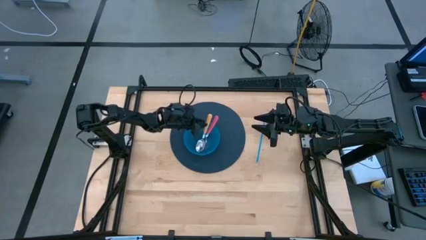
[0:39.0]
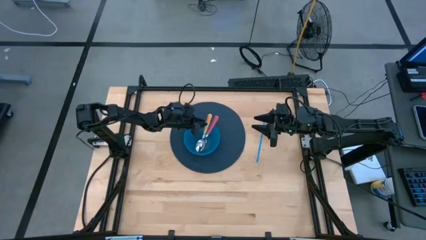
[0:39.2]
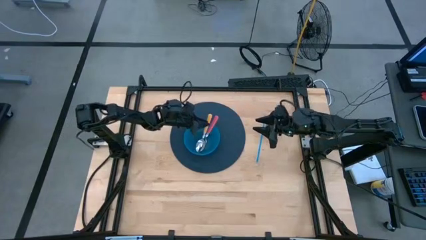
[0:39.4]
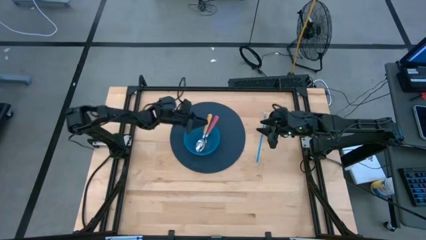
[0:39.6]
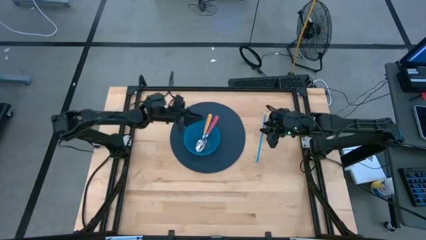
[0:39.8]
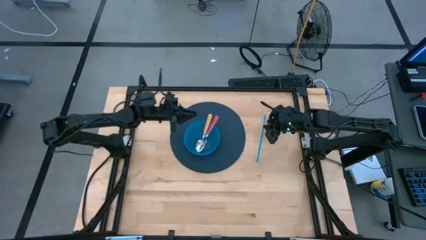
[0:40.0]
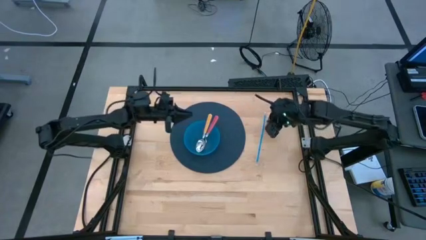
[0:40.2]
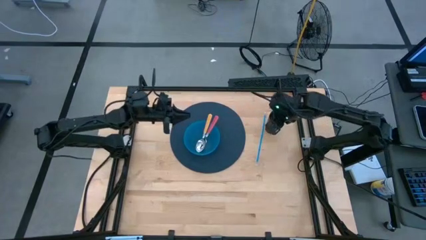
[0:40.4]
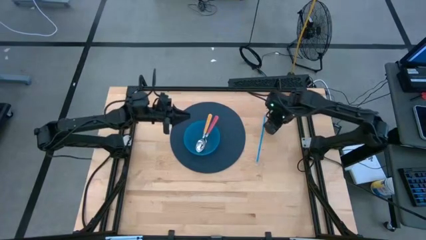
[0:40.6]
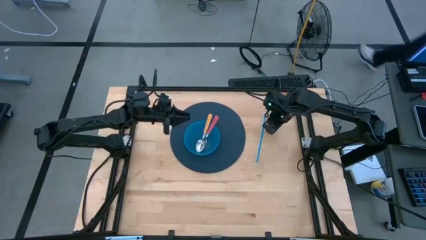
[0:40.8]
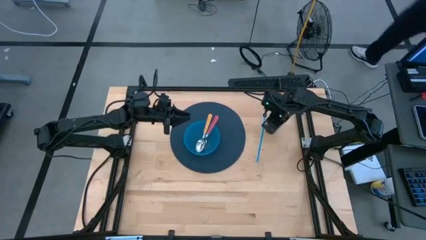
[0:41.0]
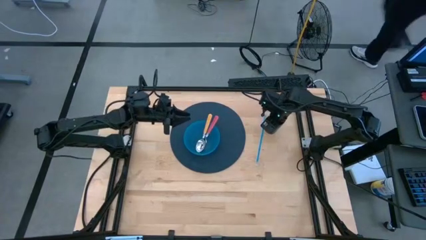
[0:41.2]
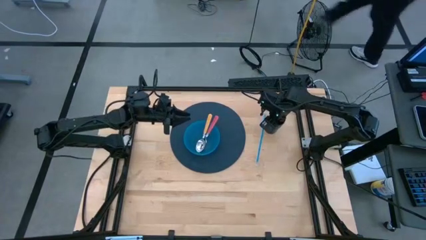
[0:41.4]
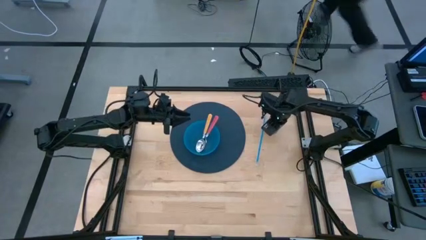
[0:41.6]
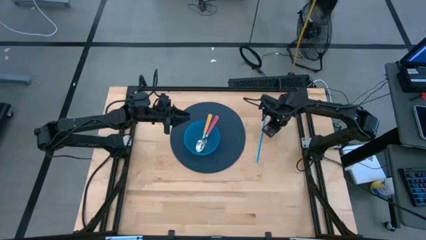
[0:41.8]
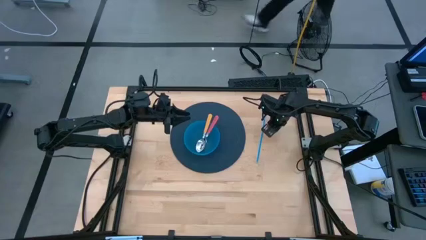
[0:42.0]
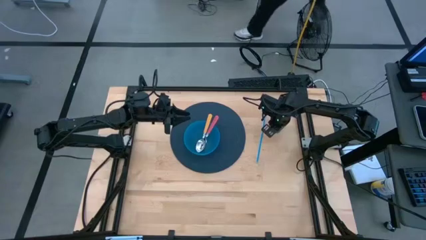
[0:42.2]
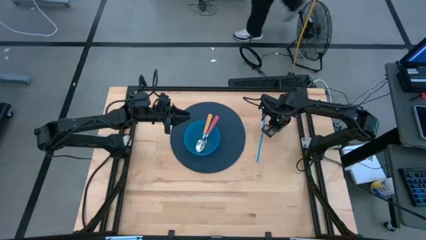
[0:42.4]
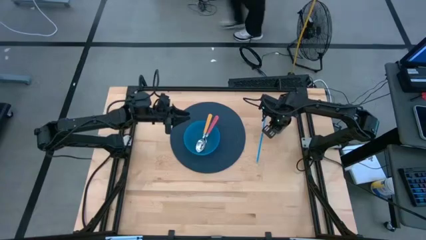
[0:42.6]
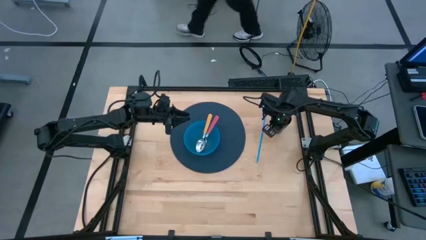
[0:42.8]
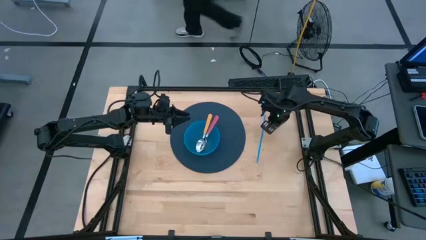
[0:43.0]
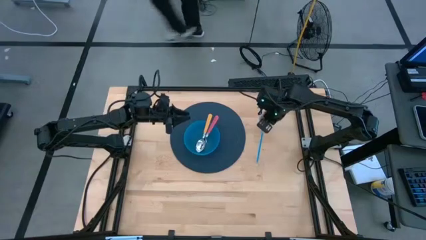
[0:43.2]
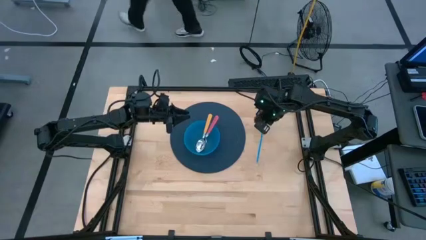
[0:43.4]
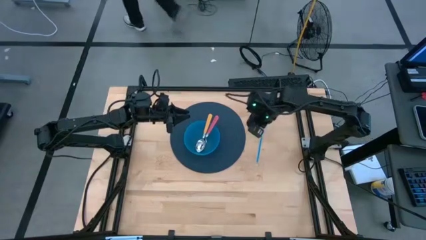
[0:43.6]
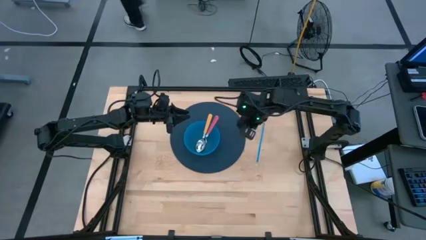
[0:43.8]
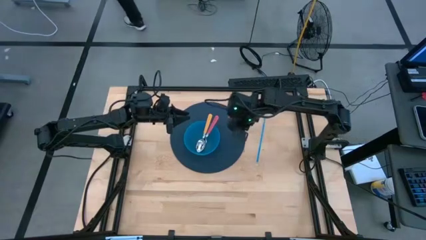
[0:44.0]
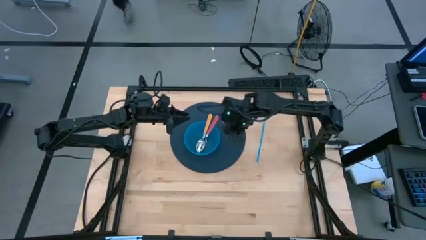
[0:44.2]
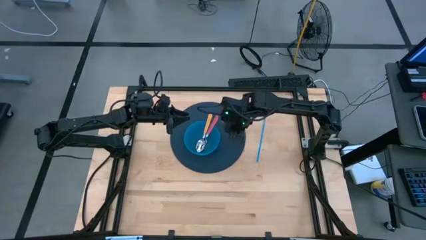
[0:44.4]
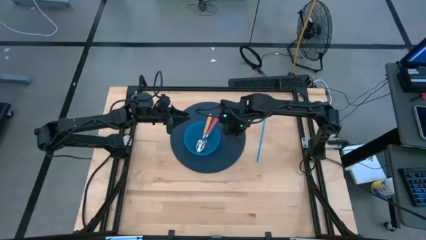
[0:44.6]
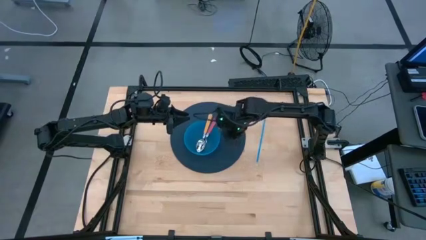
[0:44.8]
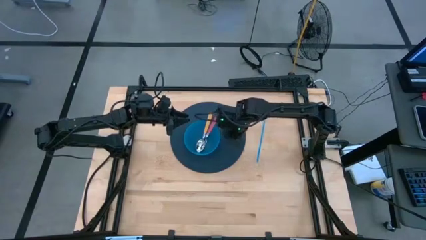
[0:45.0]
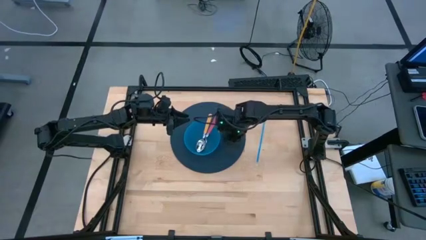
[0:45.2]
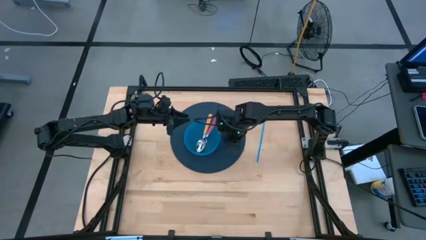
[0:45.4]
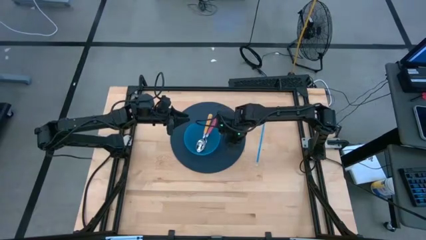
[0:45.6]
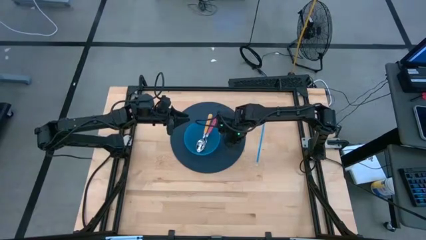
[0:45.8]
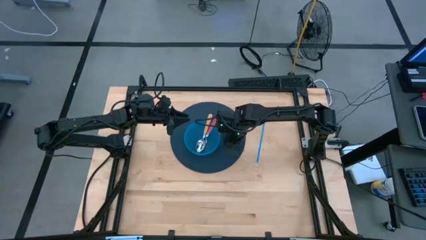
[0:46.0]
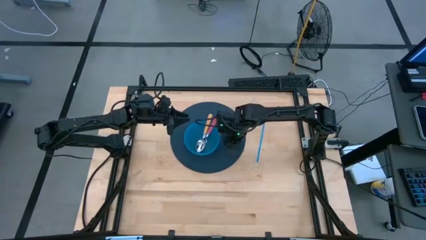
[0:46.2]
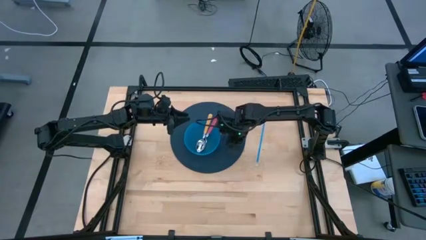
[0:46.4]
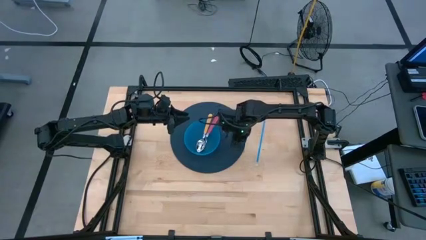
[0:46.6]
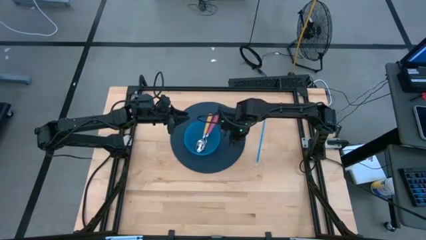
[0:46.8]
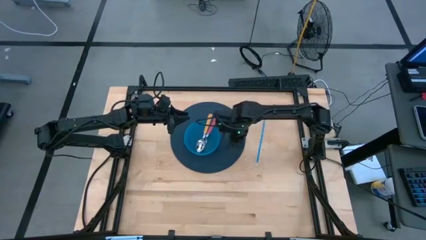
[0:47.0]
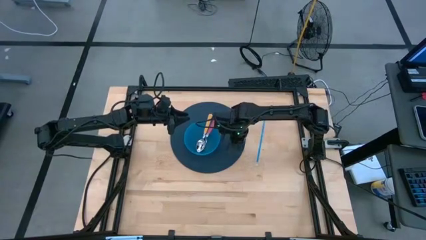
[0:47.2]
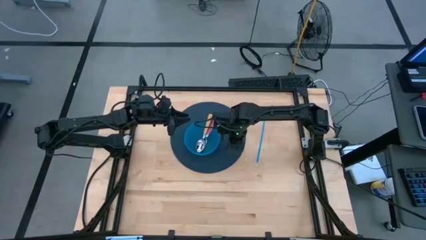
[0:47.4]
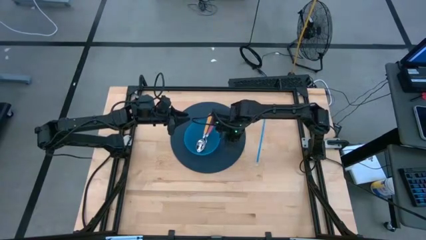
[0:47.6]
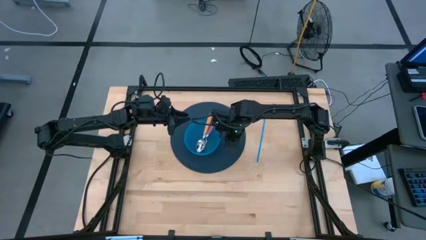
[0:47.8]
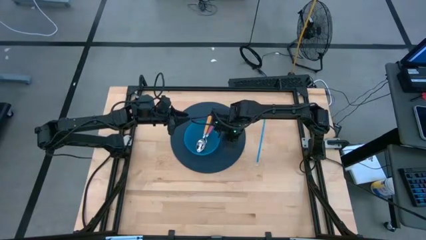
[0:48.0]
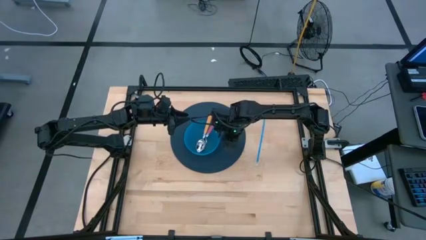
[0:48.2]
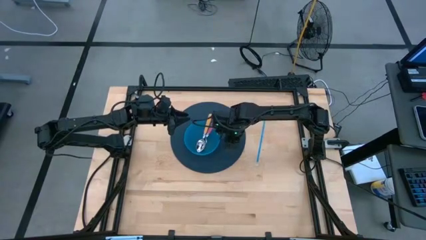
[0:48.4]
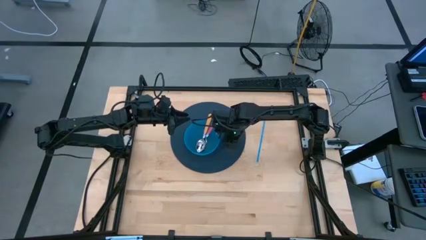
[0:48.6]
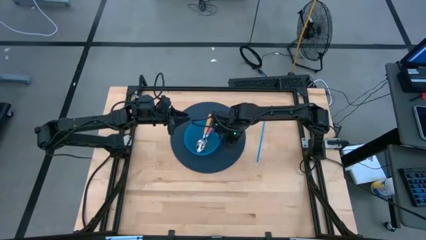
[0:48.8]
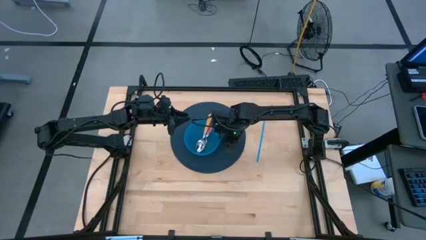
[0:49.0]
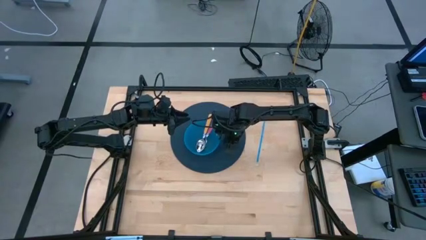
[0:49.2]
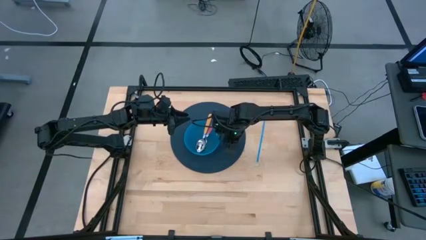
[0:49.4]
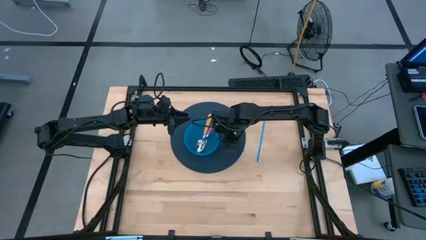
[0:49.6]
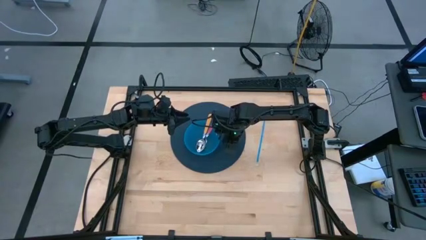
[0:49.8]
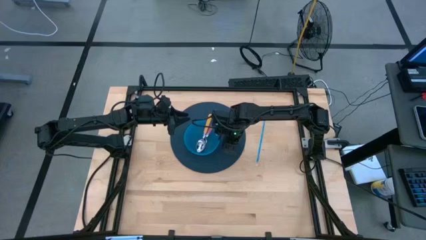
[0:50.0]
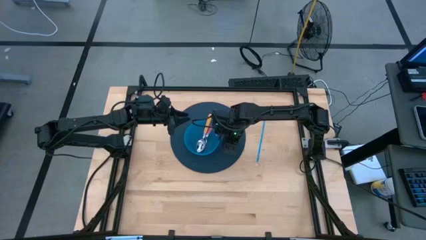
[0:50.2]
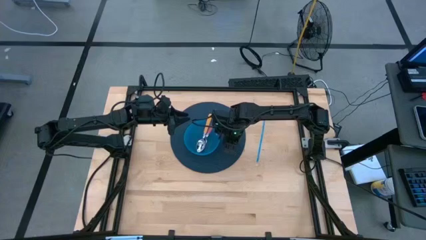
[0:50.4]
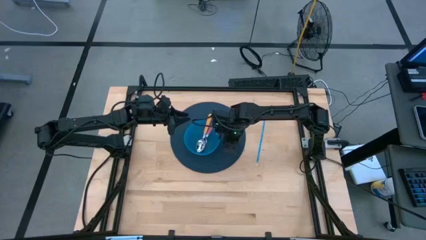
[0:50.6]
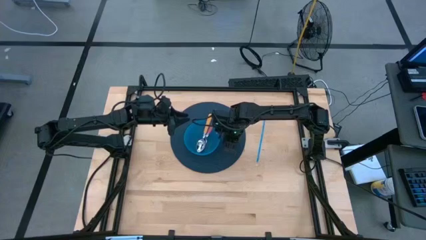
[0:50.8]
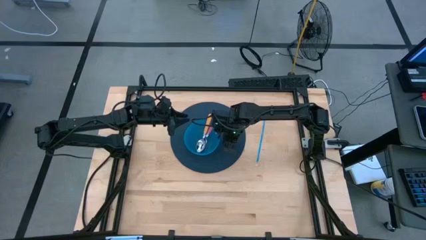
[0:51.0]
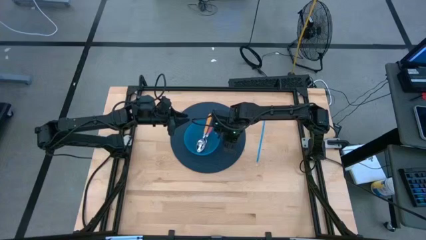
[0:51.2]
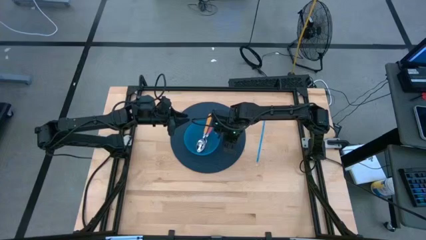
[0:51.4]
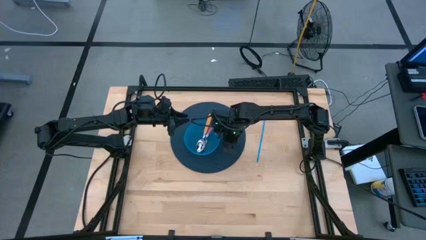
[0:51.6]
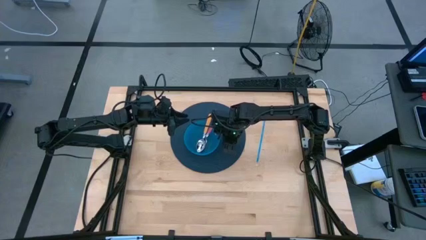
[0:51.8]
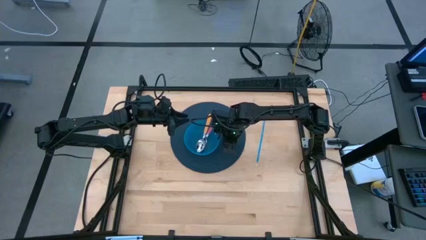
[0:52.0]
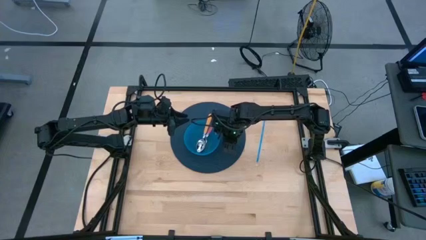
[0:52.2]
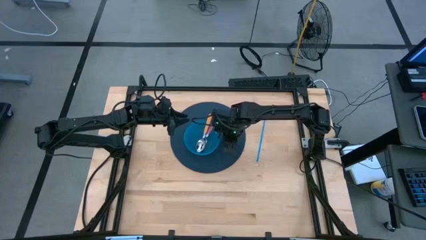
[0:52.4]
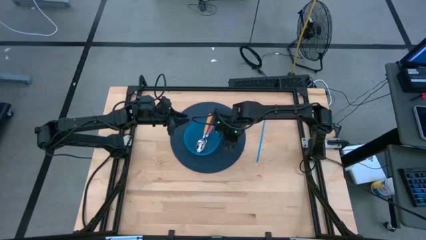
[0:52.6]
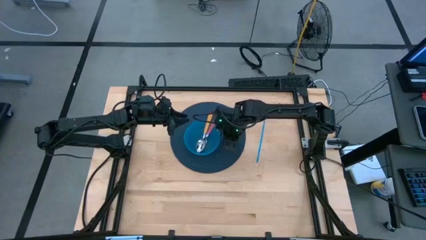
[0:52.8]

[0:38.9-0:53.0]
Task: Pick & Place Utensil
Put the black cup on the blue mat to the right of the blue bowl
